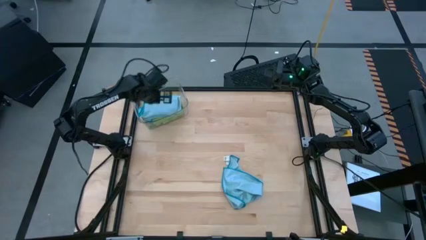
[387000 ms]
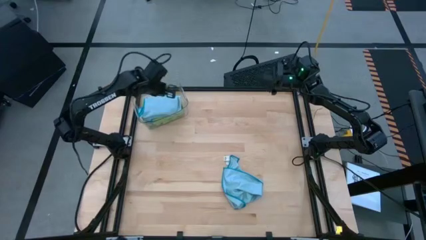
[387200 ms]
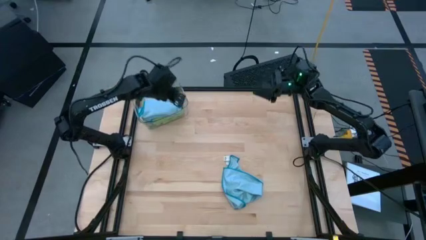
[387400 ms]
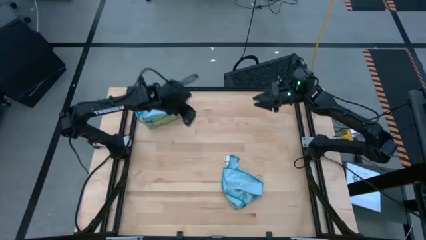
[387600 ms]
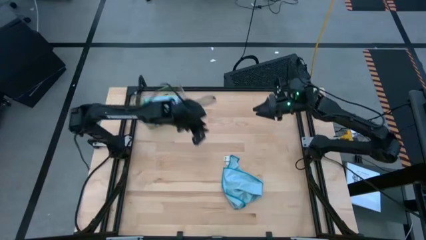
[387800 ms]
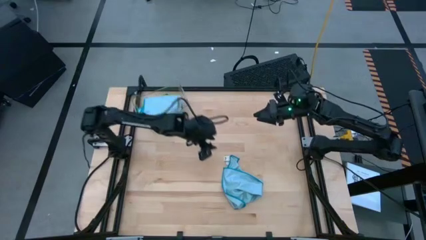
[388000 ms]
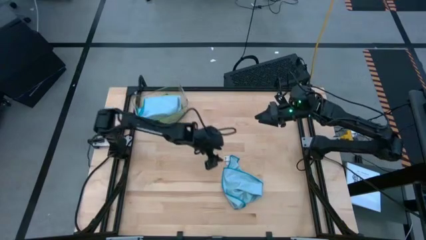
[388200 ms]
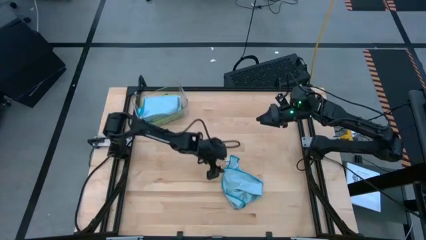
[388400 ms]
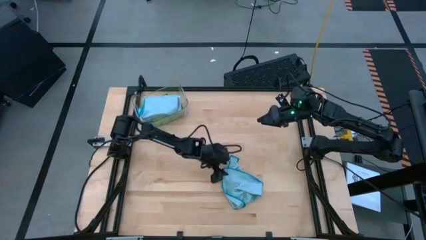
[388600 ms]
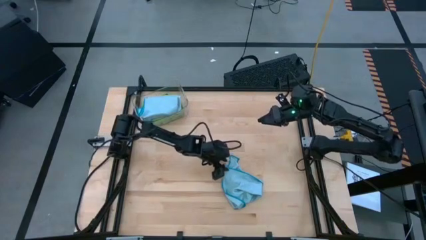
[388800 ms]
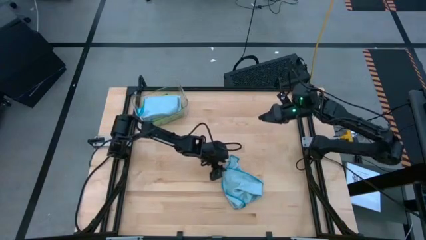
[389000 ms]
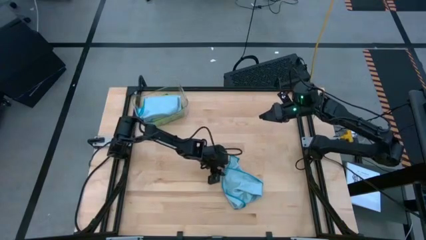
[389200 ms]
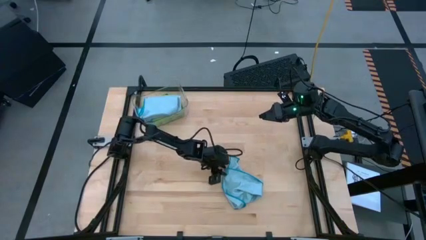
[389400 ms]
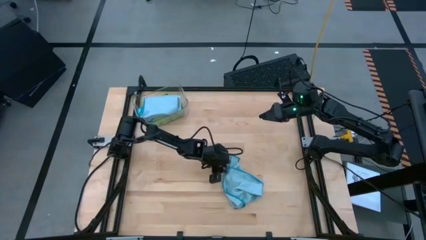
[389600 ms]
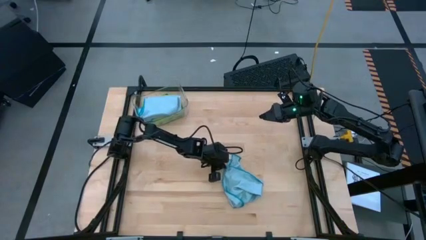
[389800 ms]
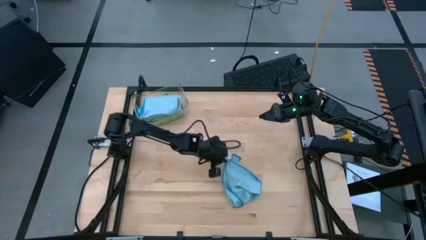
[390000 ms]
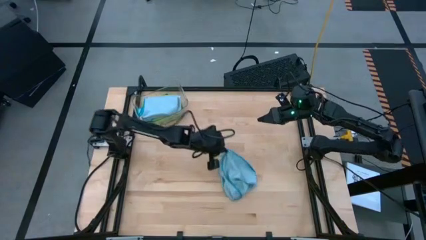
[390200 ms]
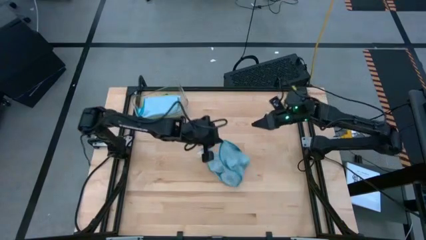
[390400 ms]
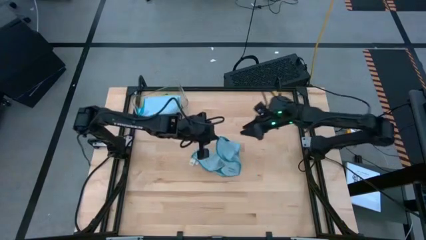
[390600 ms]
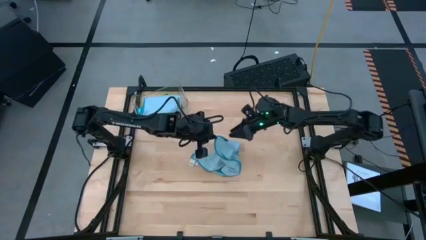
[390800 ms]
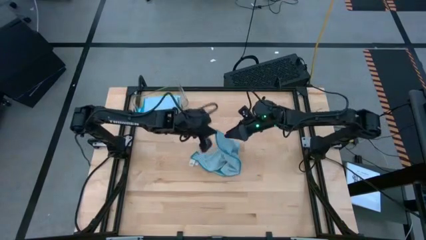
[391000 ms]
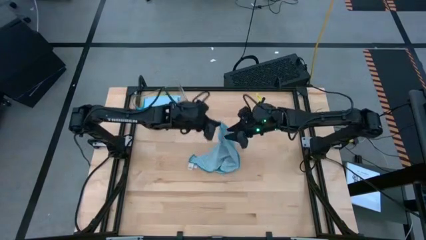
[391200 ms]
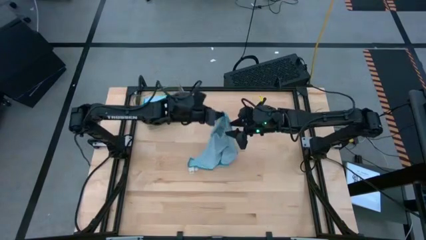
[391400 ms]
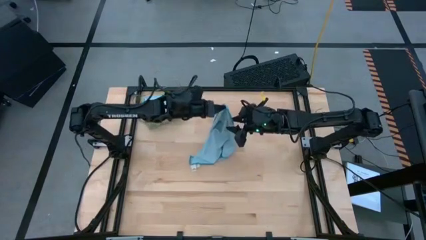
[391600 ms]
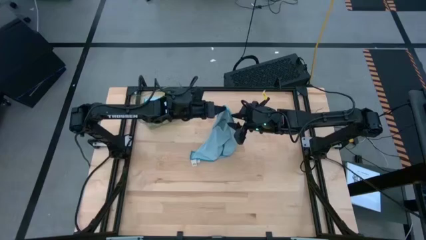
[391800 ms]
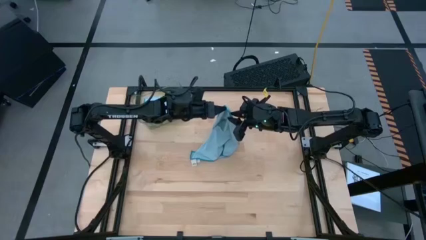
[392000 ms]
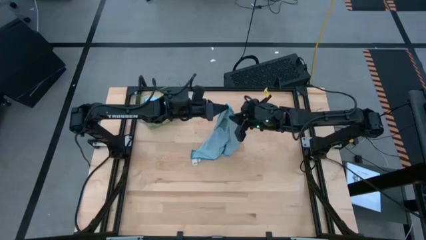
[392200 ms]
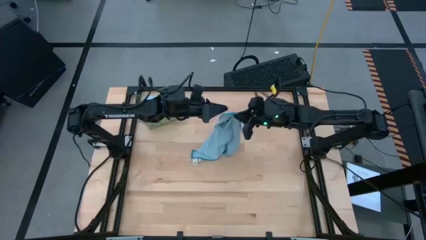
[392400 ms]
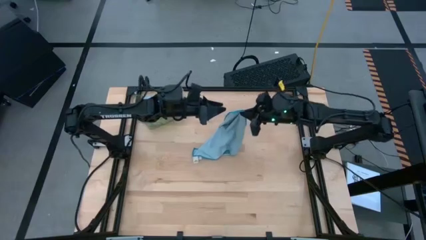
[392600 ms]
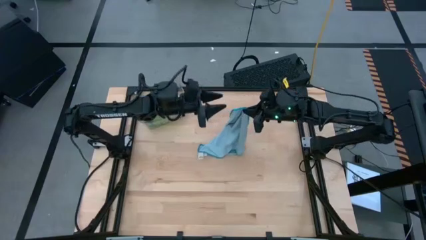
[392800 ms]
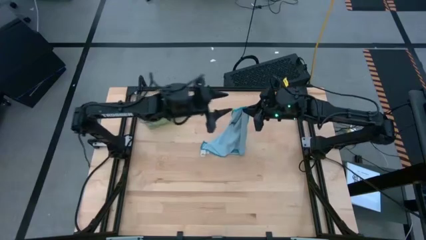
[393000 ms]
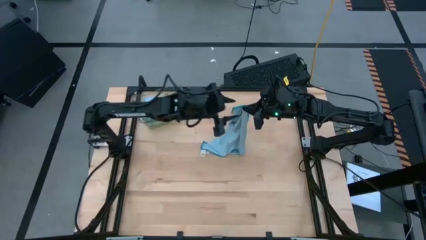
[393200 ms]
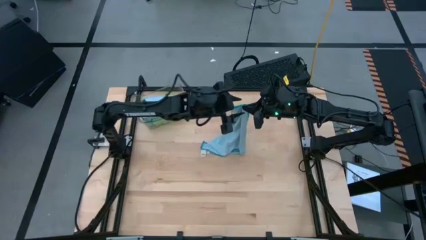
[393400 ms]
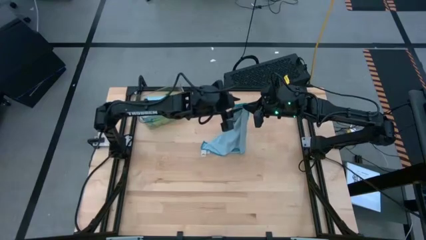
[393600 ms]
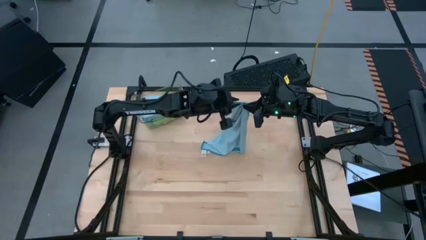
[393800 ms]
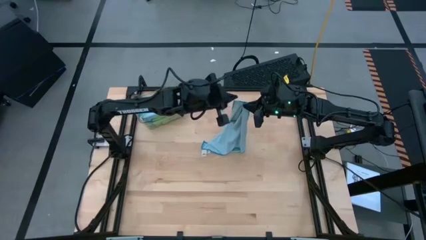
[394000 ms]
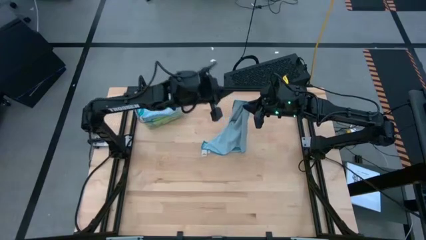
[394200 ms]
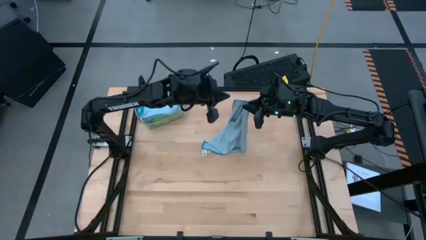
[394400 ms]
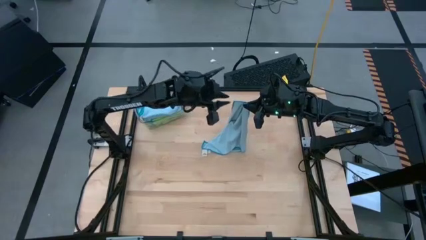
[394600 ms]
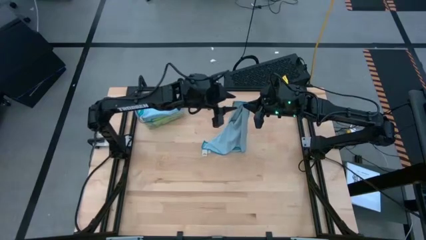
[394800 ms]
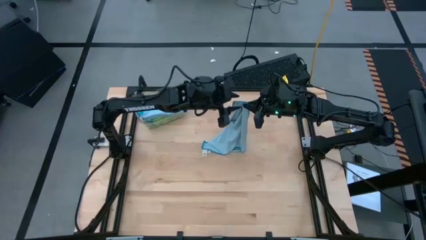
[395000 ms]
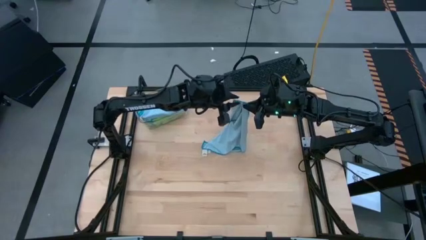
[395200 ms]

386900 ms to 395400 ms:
Task: Fold microfiber towels
Fold the blue microfiber cloth

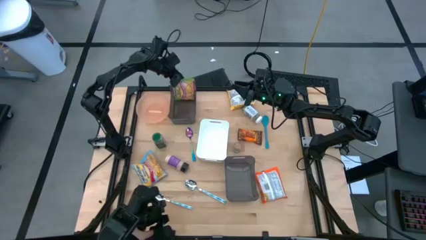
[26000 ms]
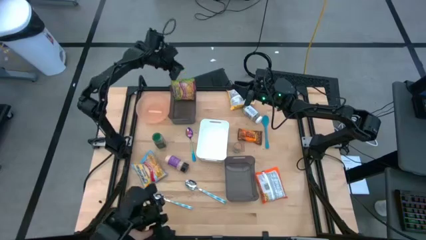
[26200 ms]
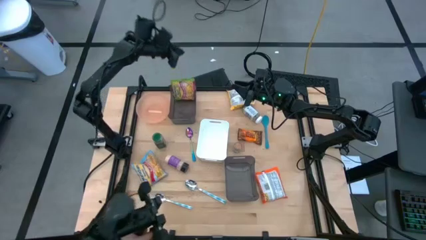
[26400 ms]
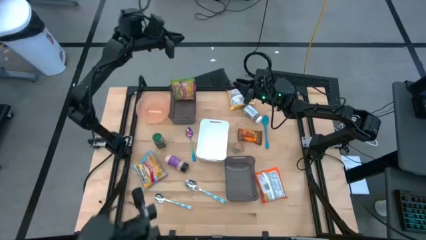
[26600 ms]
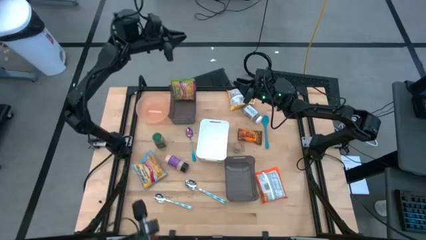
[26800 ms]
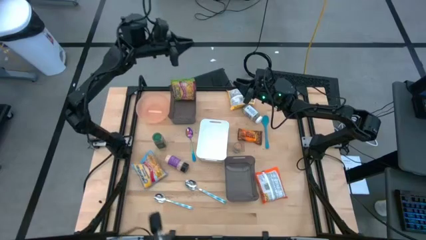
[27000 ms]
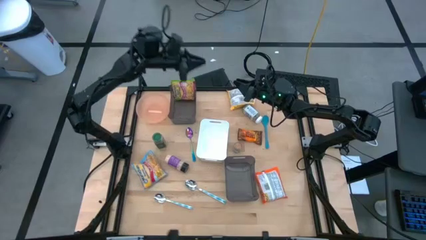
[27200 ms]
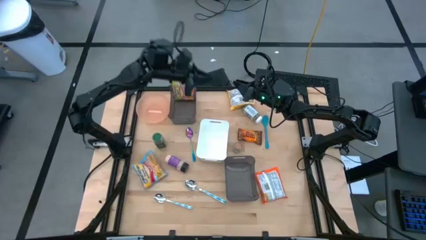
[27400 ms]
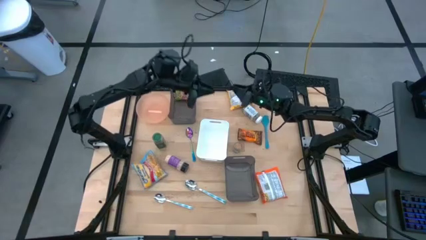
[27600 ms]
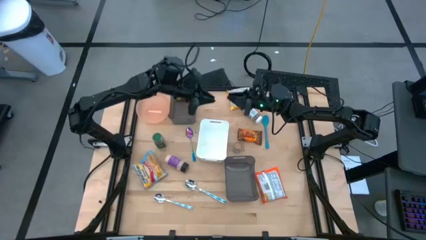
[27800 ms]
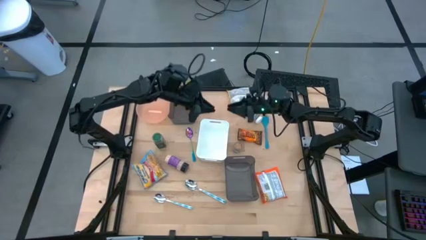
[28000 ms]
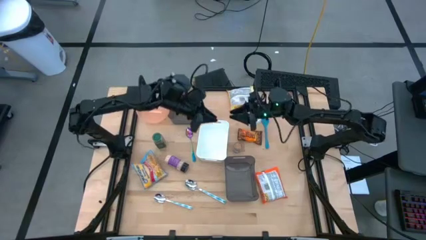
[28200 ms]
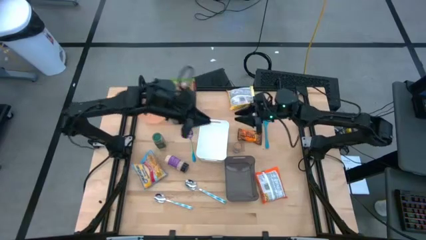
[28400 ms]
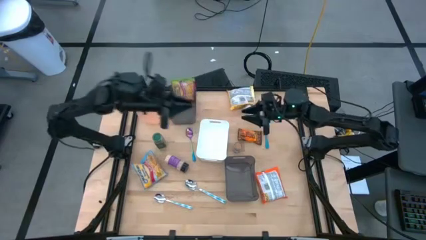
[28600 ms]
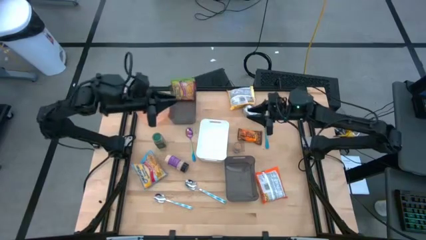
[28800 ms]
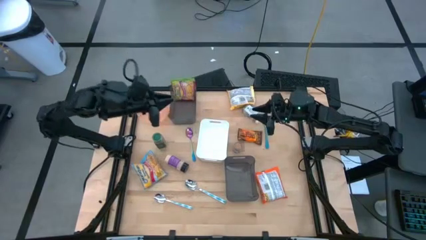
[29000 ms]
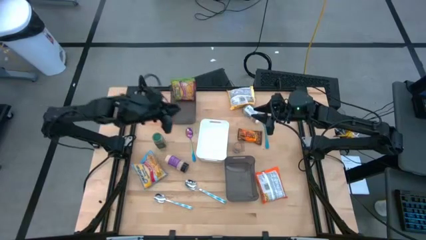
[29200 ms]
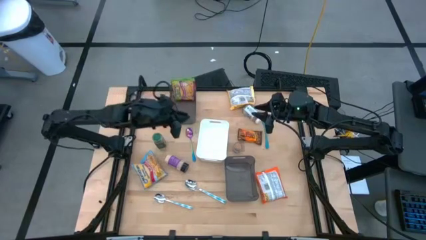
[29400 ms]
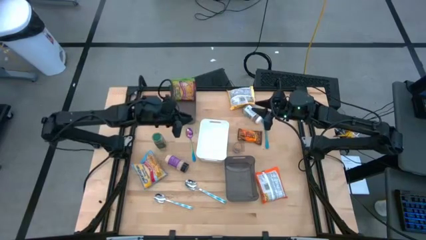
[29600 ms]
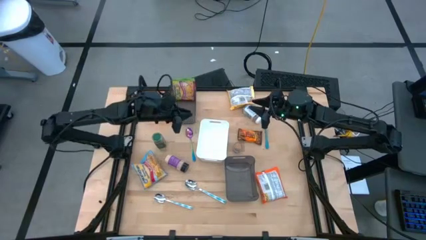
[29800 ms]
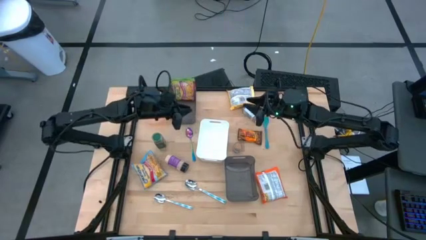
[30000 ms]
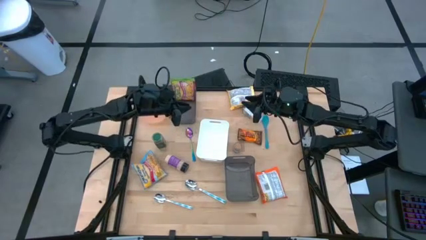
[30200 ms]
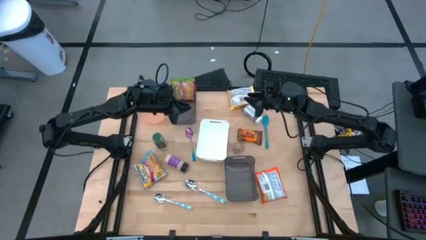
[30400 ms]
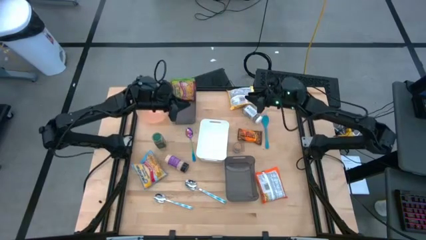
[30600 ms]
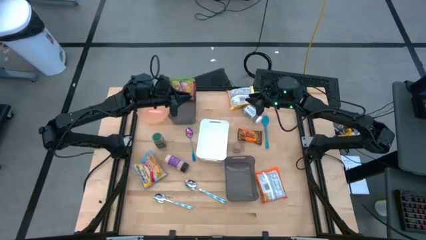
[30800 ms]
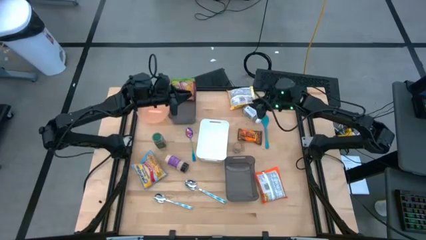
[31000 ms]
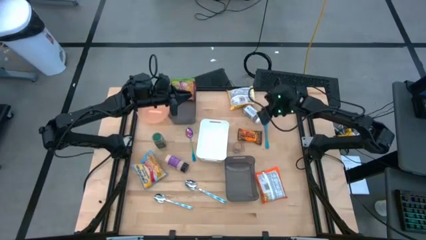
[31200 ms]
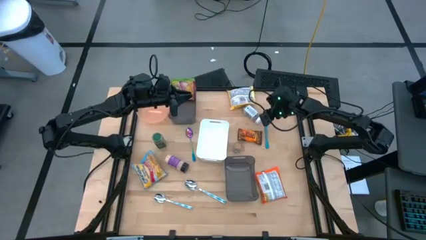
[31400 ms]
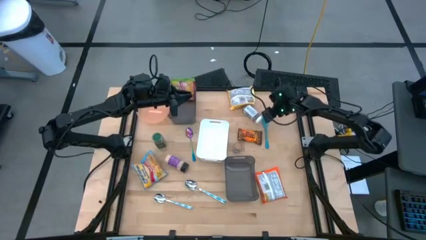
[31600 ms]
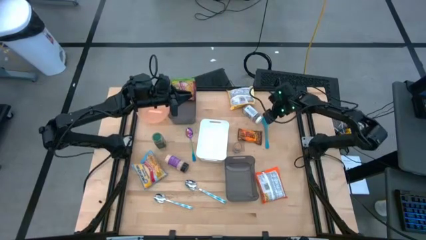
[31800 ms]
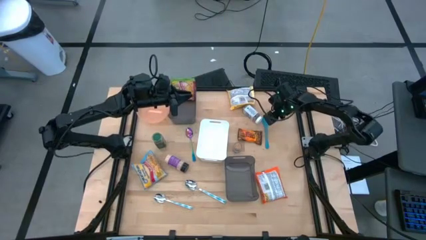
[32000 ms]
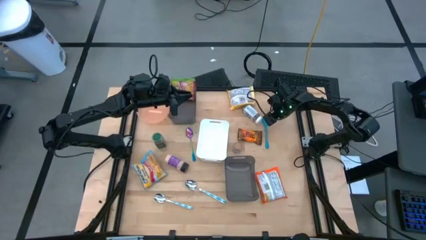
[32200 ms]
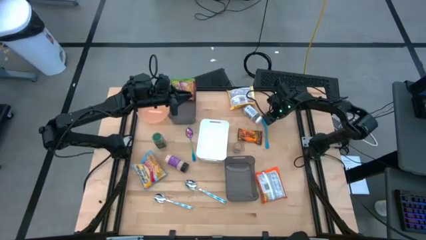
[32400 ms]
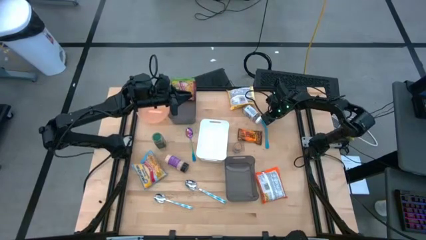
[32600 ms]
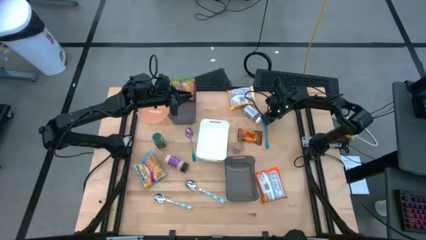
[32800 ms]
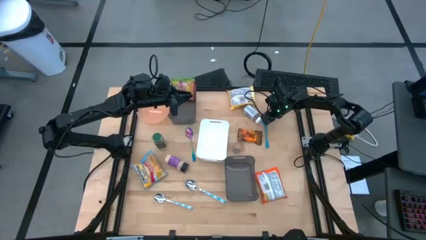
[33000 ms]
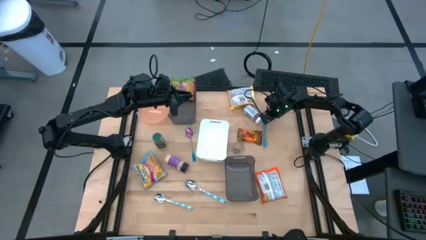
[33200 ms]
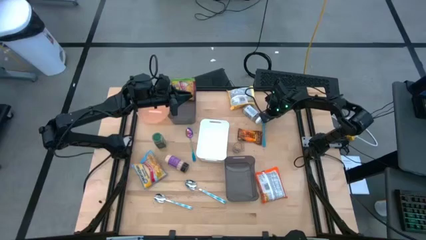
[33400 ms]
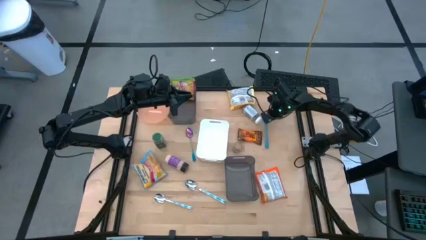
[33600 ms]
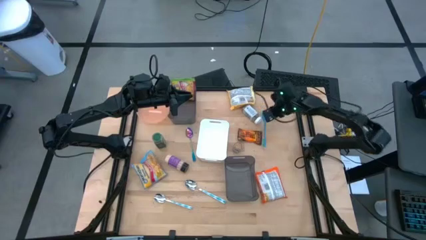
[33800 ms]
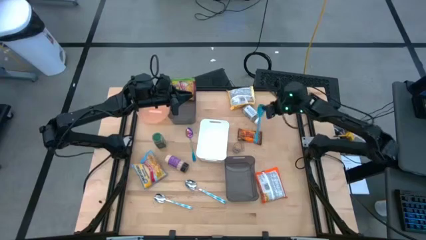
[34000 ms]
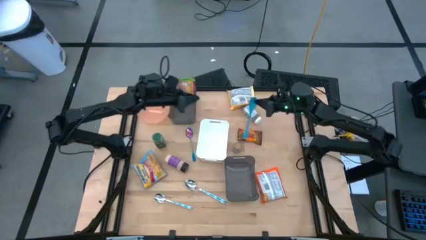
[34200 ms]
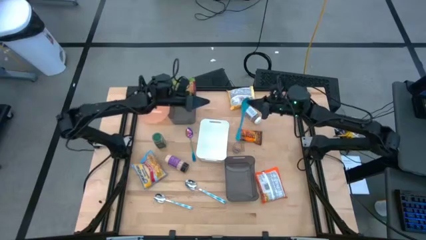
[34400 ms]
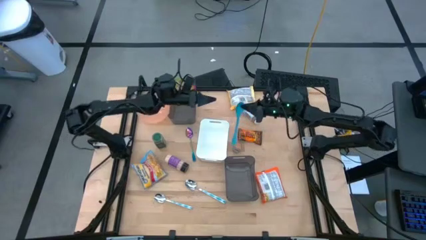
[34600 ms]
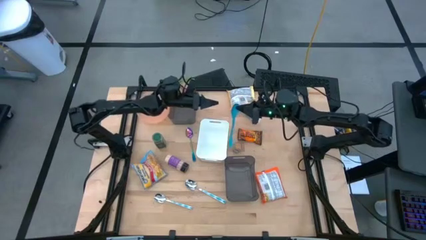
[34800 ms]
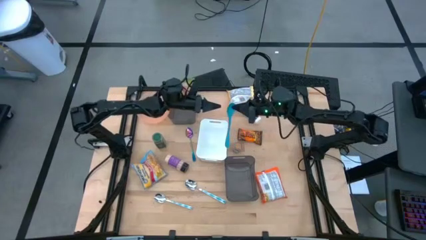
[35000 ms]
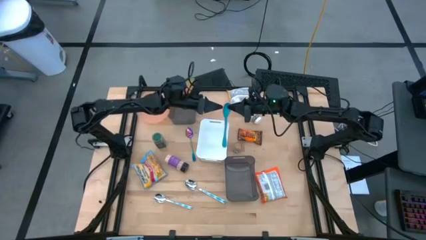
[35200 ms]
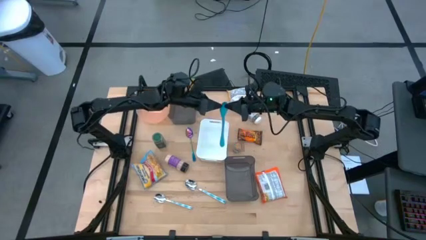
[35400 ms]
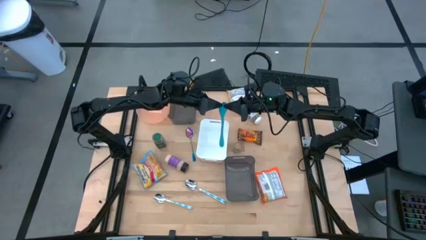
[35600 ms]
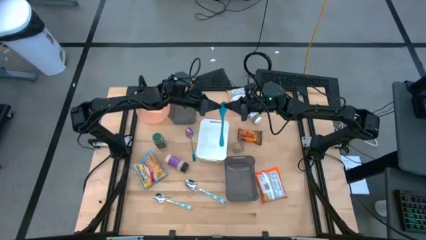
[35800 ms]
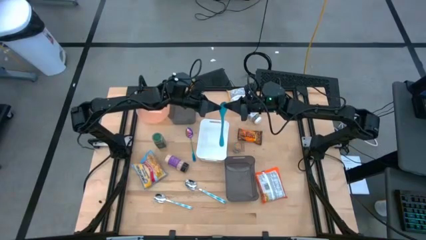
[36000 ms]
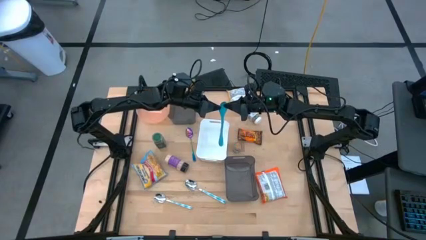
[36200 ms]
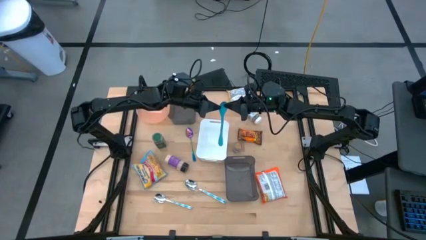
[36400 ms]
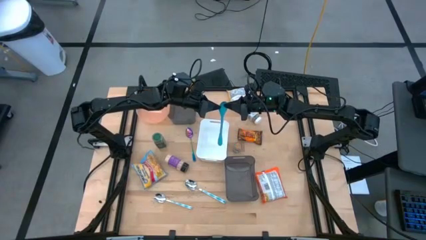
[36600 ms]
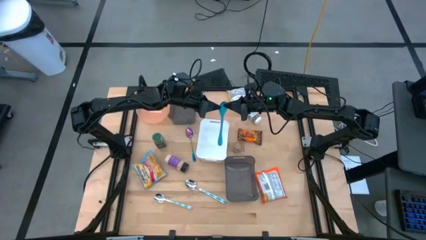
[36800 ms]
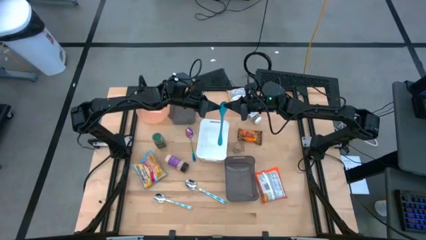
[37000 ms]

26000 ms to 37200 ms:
Task: Pick & Place Food Item
Put the blue baby spoon into the bottom black bin
